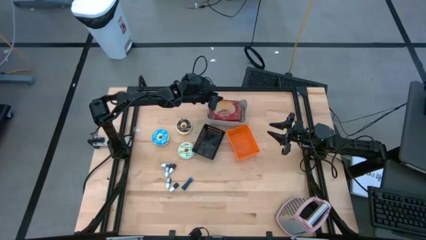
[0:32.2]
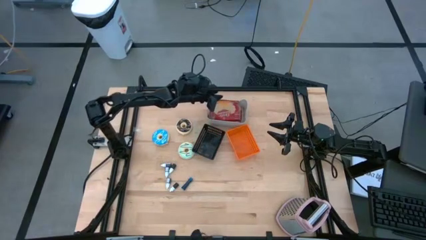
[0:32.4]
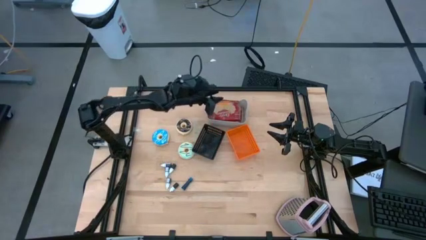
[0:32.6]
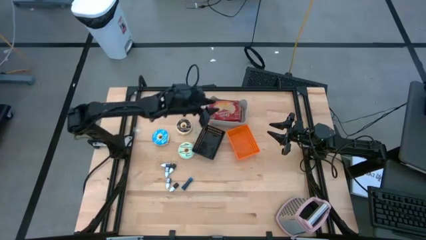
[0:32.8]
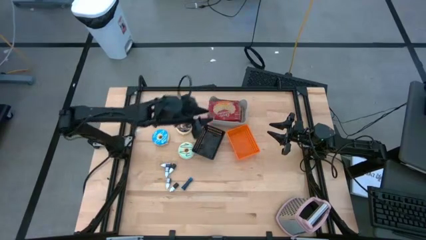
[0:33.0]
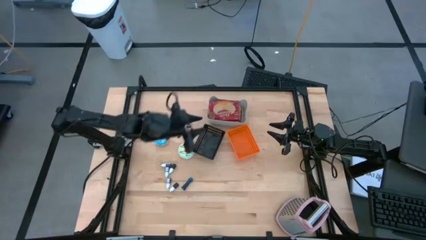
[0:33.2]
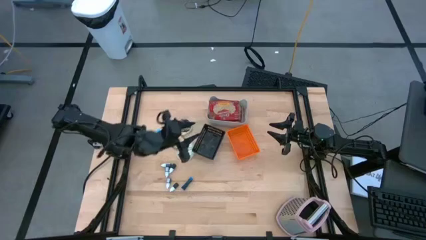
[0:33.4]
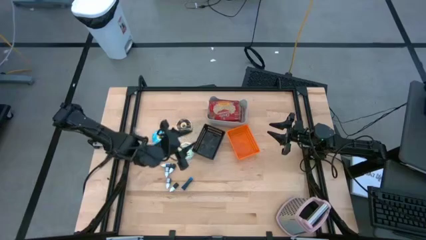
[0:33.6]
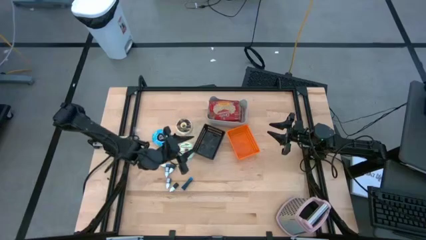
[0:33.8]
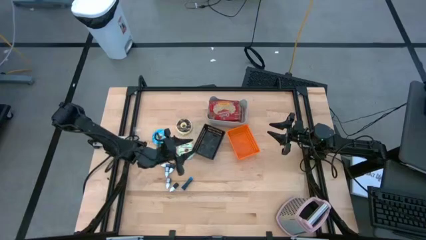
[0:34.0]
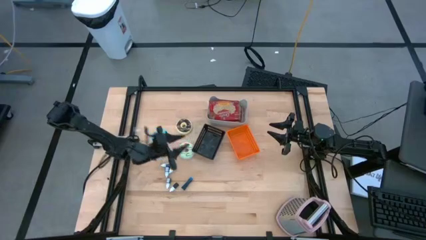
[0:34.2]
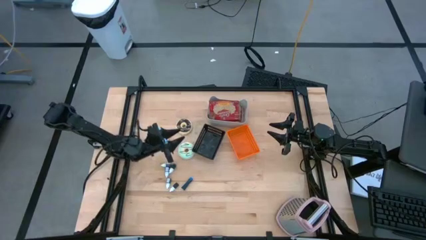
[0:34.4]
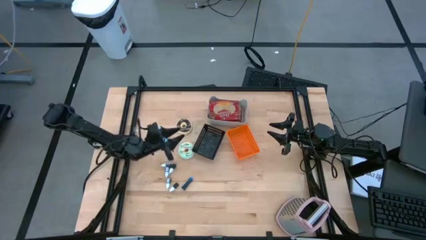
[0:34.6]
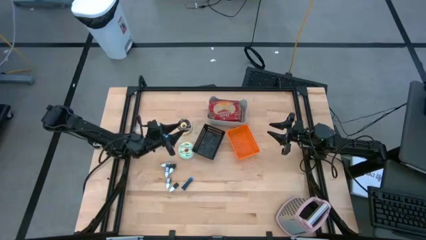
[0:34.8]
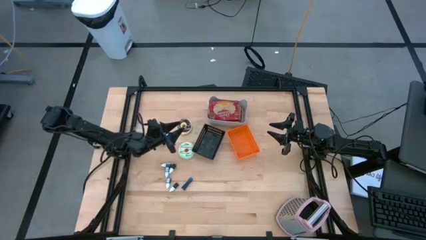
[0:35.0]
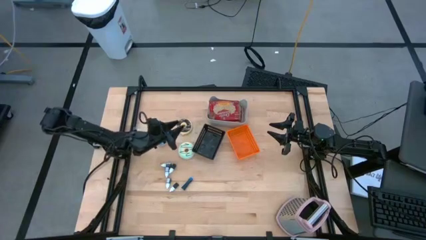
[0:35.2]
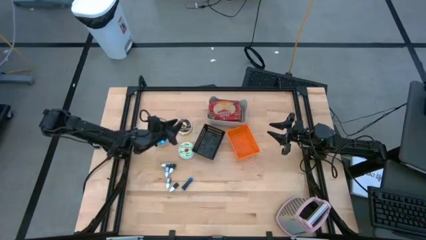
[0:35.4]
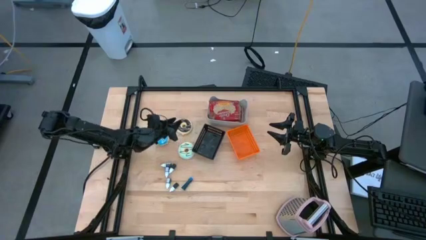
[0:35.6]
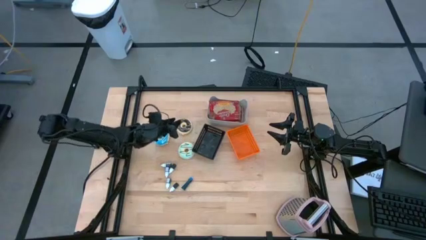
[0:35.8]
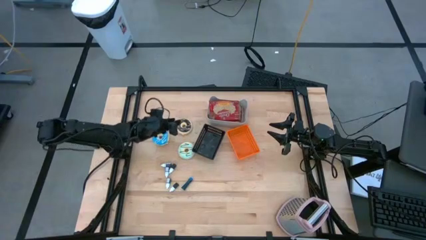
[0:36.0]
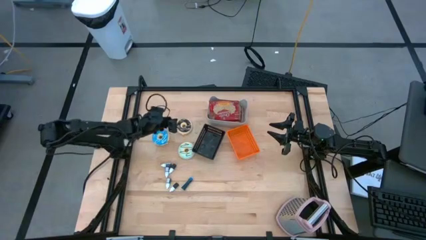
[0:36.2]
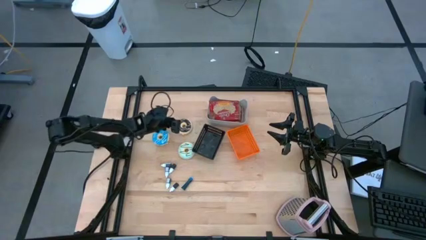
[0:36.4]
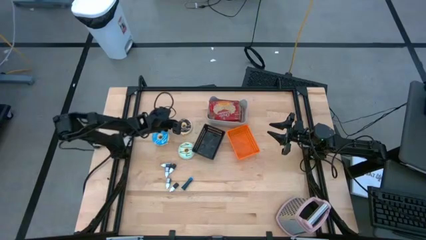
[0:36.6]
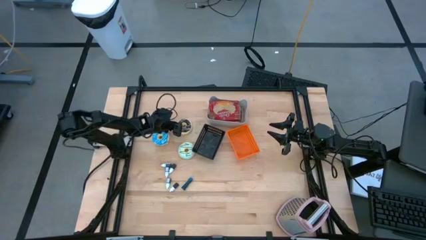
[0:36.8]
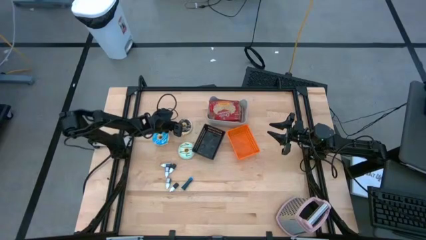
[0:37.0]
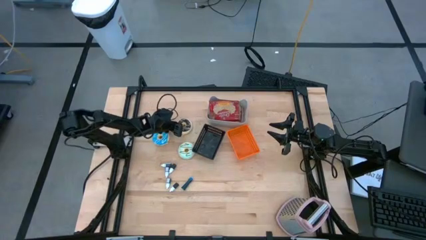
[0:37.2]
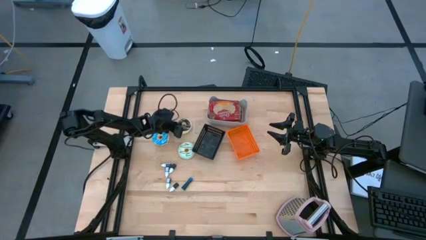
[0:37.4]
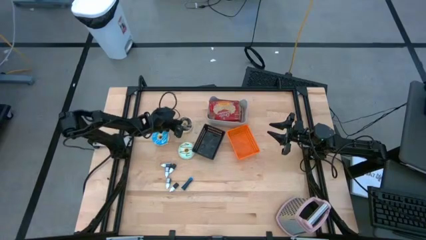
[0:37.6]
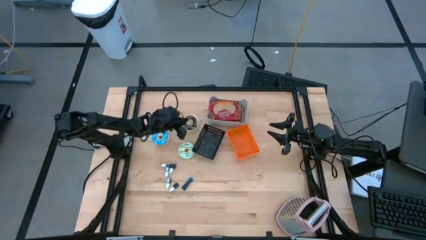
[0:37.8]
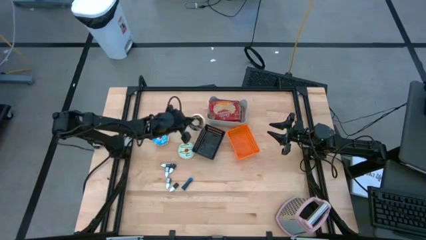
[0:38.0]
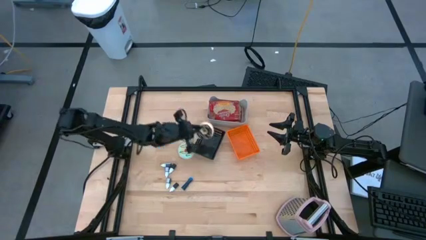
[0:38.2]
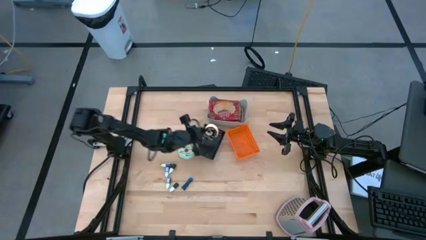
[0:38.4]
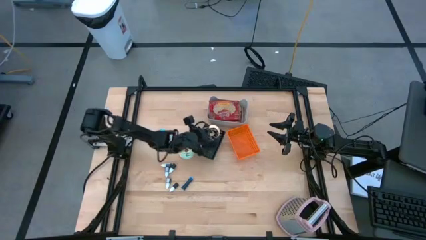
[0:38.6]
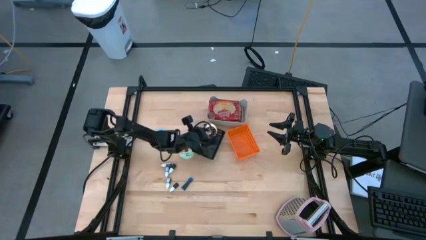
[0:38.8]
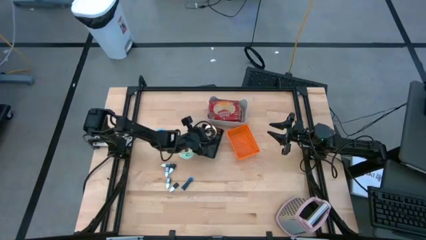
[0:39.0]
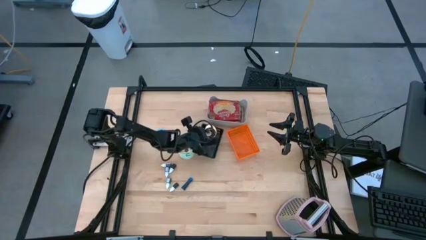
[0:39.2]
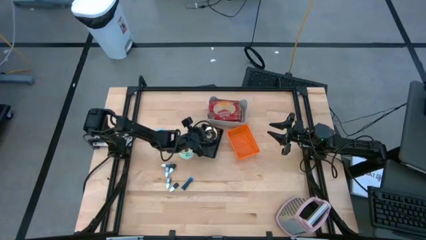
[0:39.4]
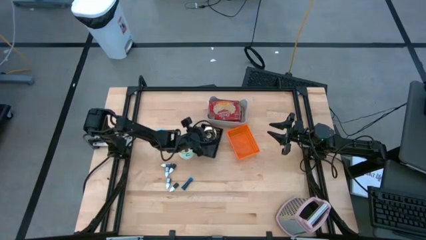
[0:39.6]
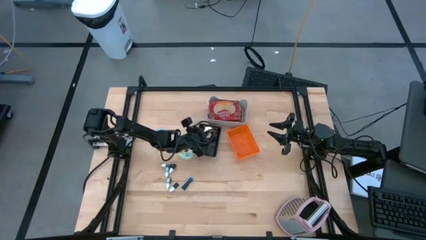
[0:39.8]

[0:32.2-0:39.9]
Put the black doughnut into the black bin

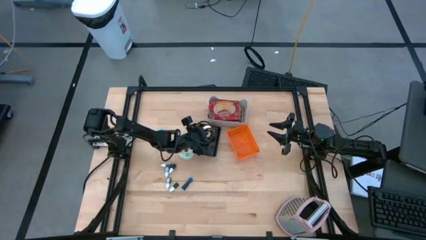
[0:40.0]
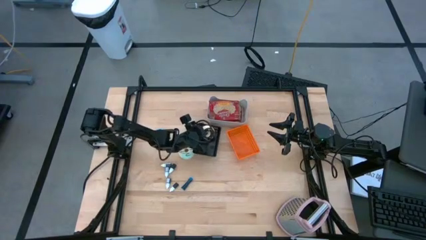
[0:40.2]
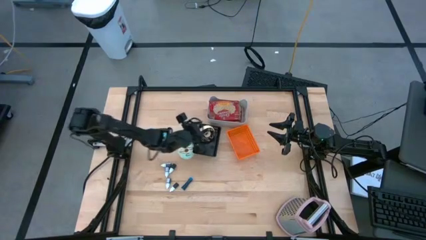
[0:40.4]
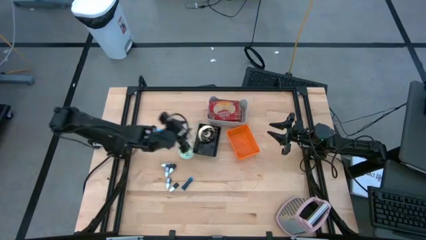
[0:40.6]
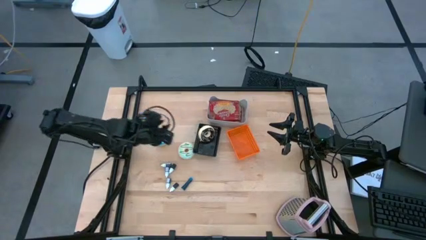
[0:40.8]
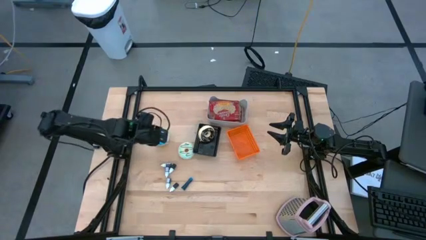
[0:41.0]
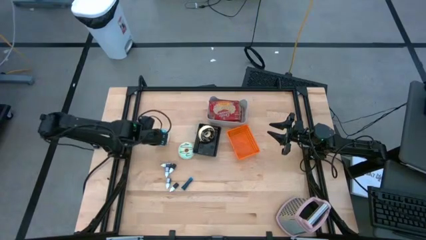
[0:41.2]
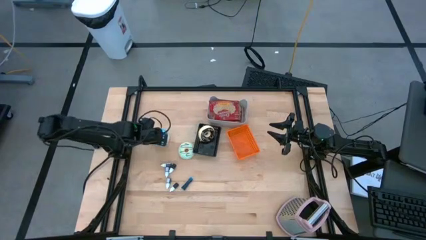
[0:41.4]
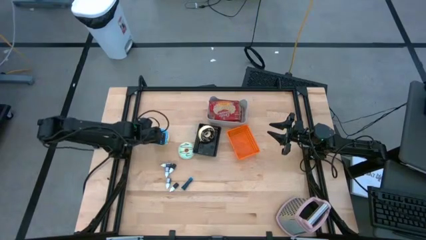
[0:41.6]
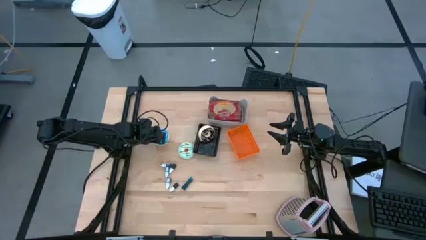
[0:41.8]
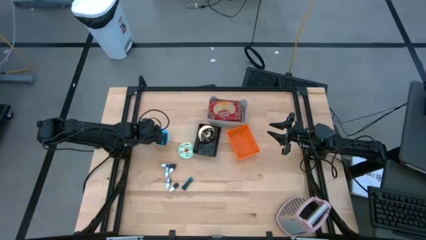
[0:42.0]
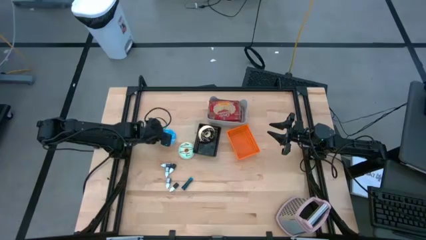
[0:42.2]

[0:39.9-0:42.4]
Put the blue doughnut into the black bin

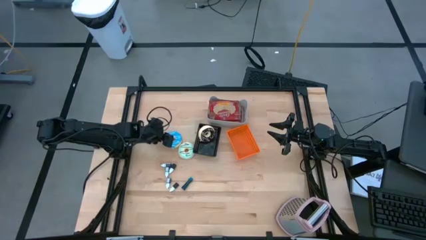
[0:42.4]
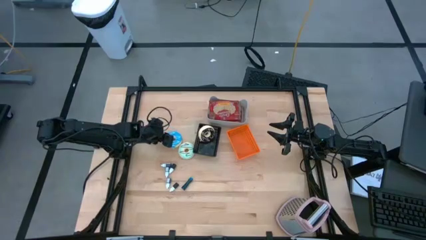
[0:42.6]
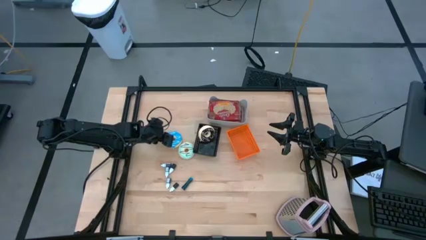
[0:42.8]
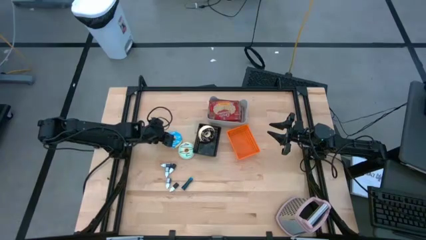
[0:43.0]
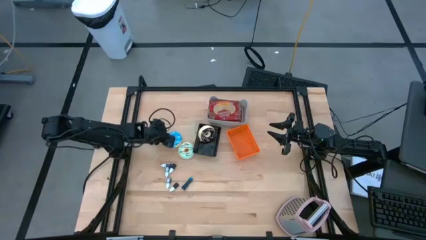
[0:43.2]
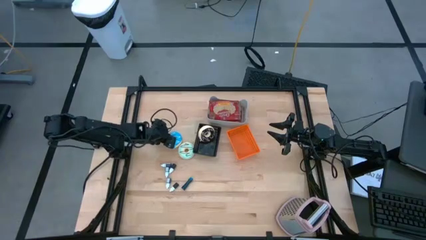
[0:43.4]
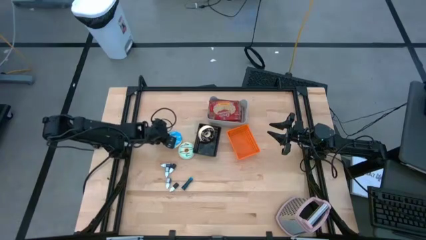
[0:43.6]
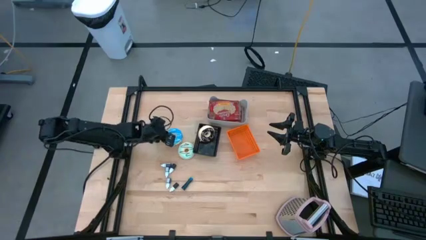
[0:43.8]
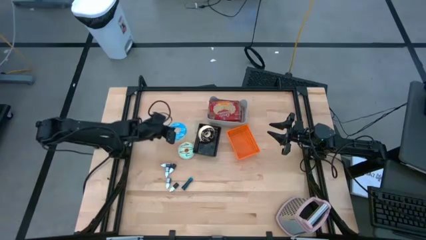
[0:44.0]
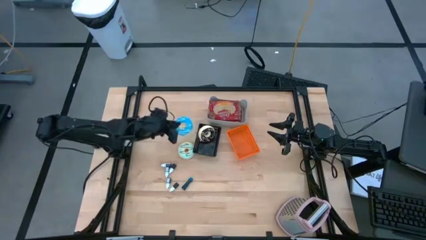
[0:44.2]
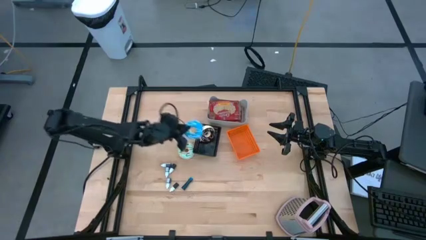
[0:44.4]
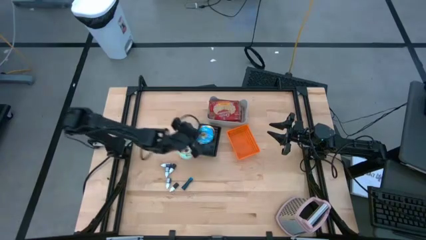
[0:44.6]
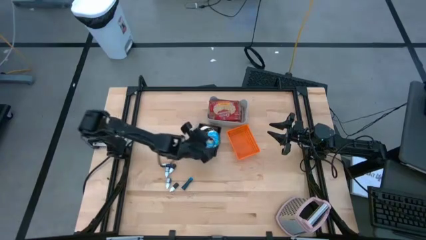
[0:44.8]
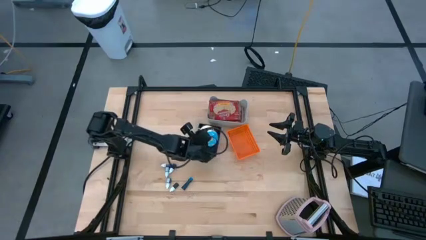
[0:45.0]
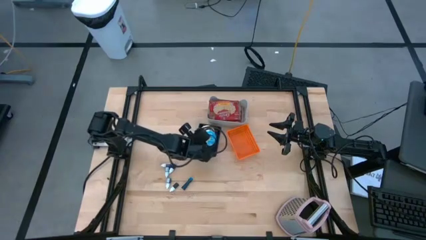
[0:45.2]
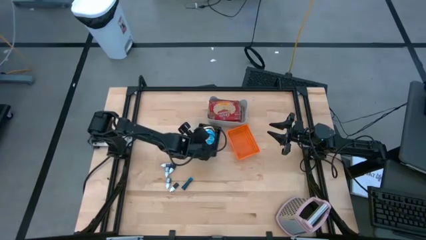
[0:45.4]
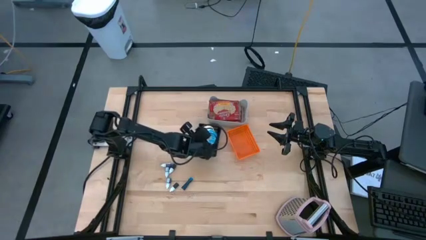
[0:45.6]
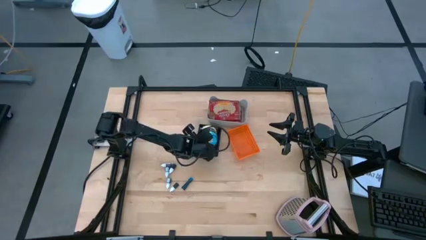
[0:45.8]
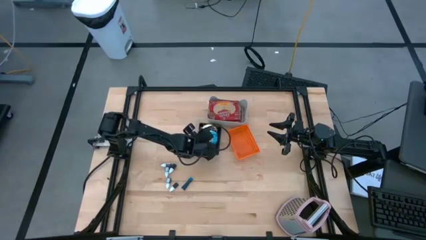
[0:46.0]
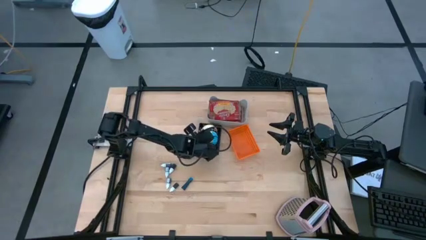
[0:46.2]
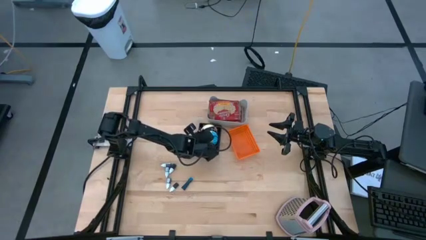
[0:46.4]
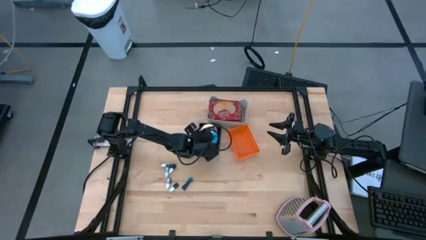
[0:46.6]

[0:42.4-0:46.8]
Put the blue doughnut into the black bin

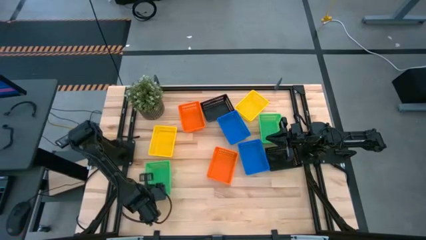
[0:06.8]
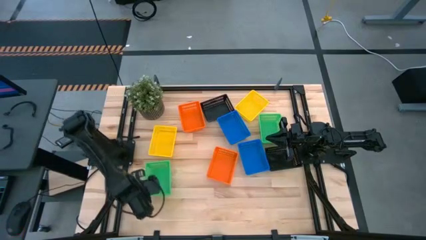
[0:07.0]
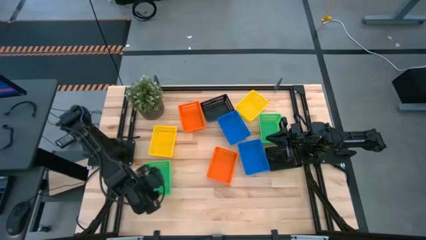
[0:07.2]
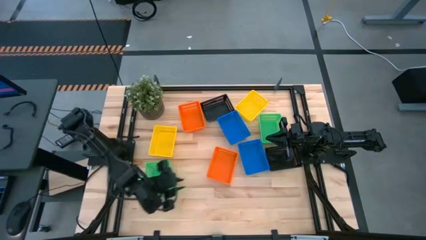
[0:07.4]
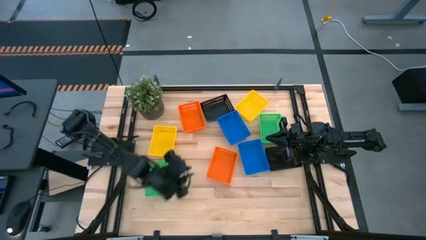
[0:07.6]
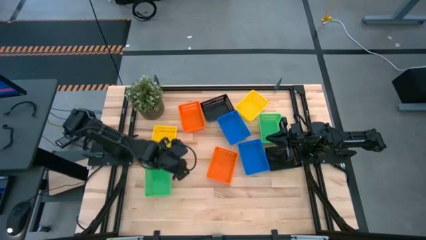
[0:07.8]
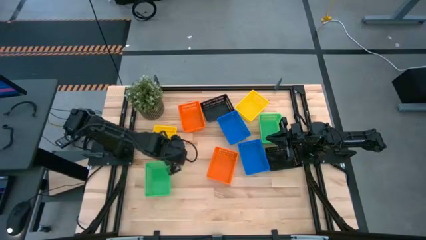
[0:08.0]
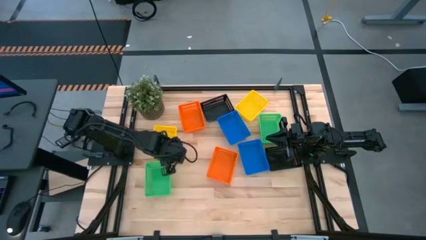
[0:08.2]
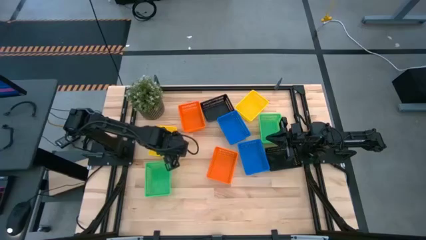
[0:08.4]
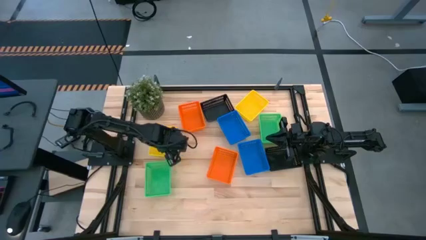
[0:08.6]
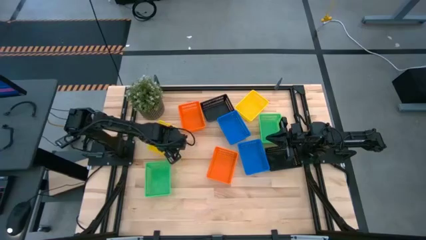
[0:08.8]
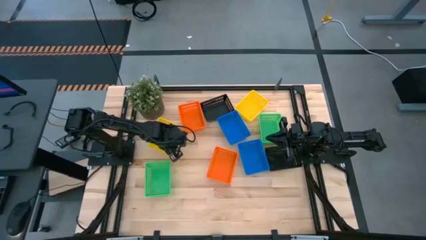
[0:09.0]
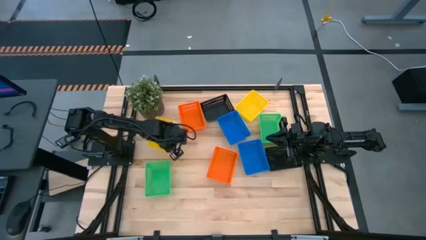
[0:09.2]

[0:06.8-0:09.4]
Move the left yellow bin to the to the right of the green bin
